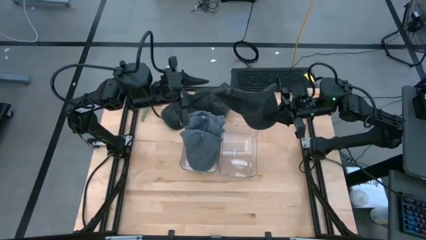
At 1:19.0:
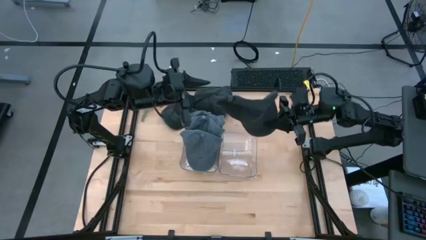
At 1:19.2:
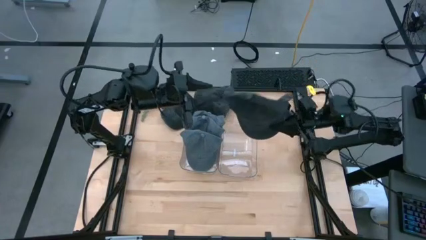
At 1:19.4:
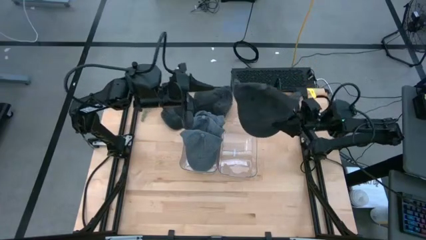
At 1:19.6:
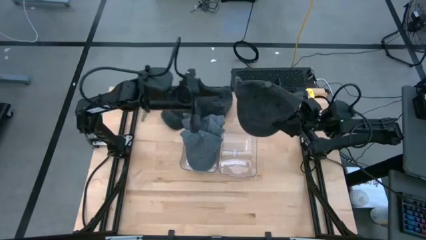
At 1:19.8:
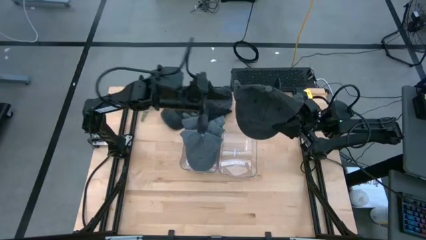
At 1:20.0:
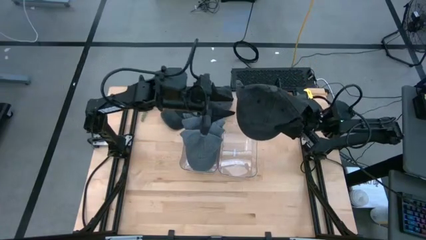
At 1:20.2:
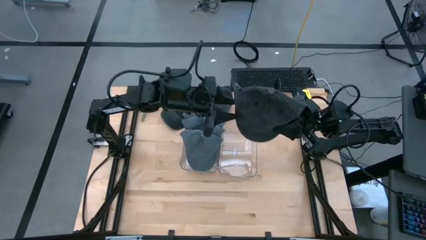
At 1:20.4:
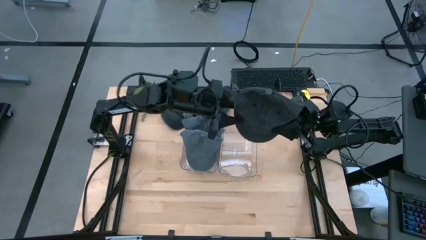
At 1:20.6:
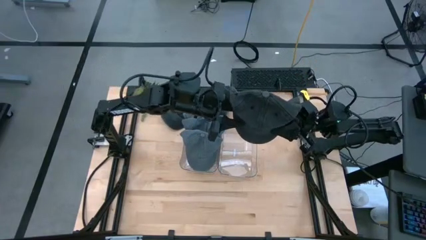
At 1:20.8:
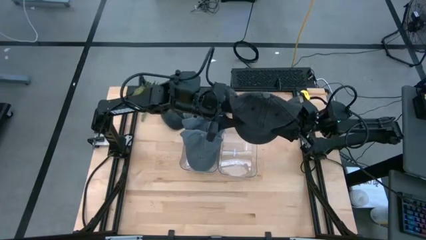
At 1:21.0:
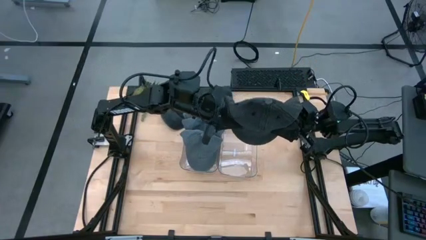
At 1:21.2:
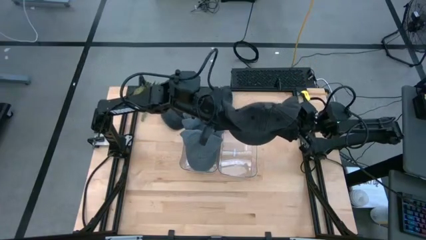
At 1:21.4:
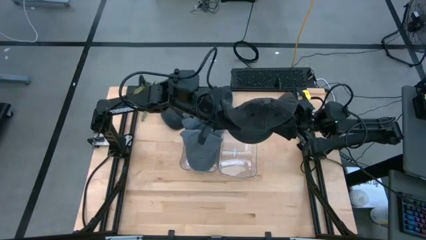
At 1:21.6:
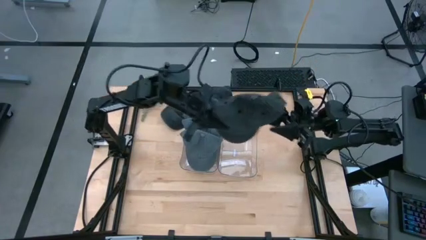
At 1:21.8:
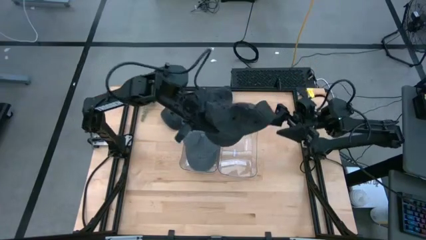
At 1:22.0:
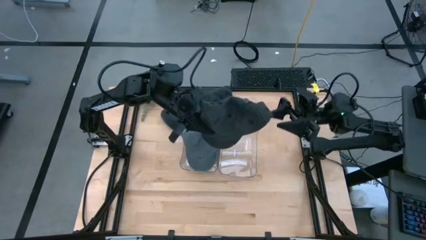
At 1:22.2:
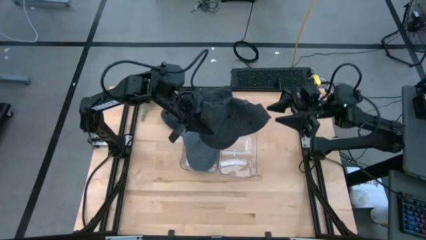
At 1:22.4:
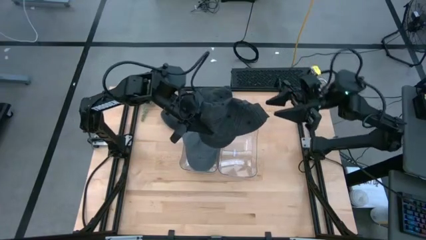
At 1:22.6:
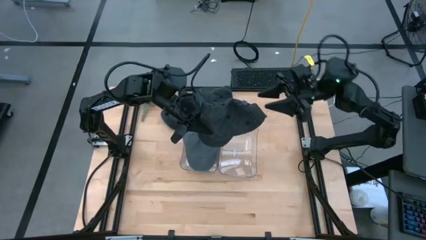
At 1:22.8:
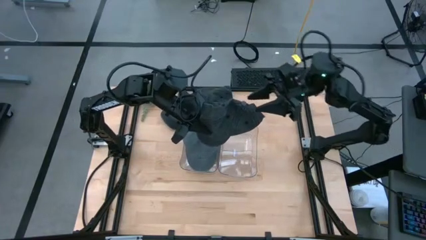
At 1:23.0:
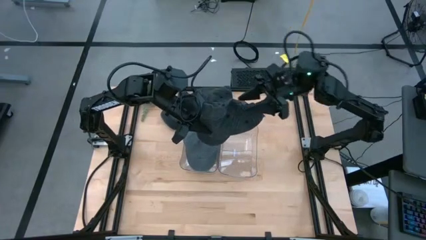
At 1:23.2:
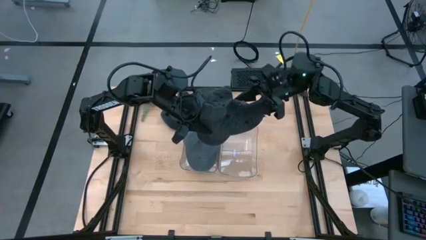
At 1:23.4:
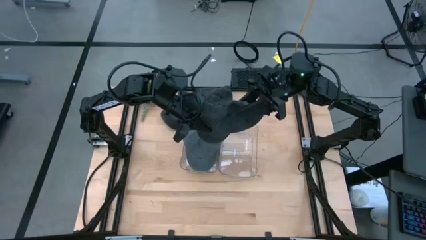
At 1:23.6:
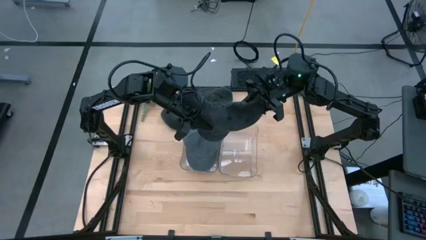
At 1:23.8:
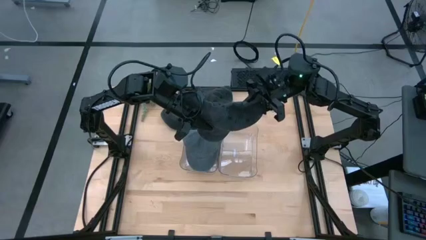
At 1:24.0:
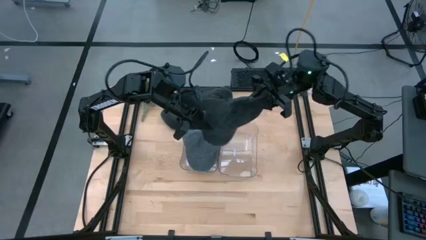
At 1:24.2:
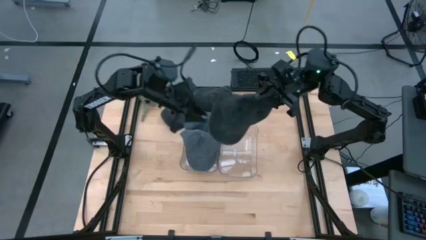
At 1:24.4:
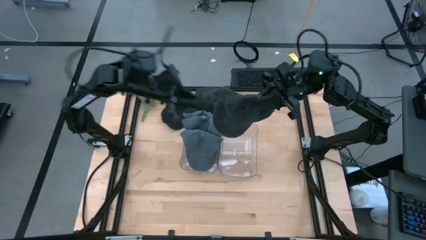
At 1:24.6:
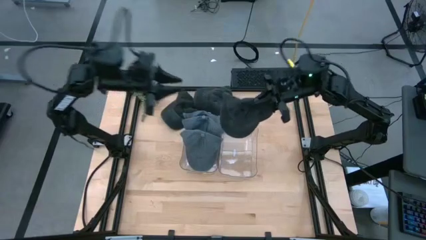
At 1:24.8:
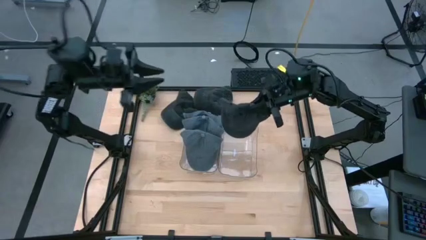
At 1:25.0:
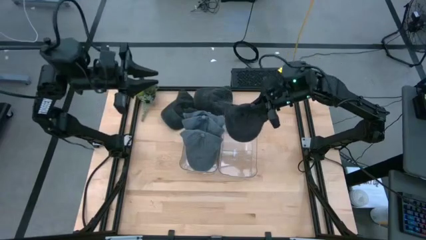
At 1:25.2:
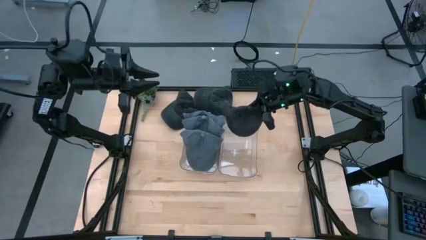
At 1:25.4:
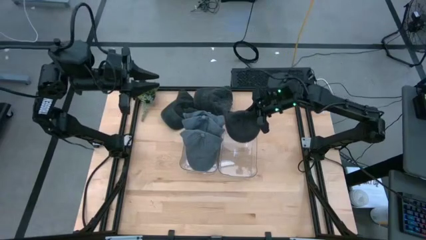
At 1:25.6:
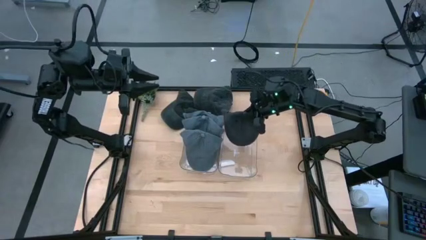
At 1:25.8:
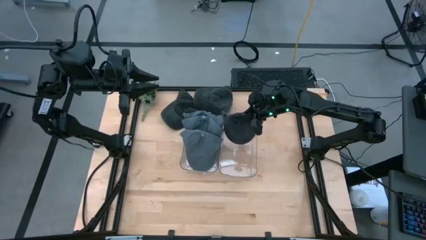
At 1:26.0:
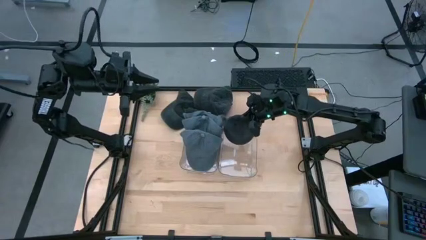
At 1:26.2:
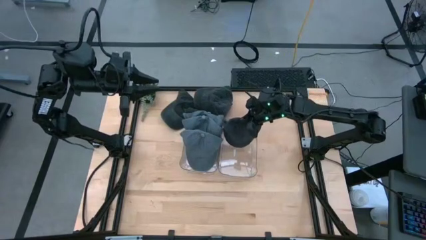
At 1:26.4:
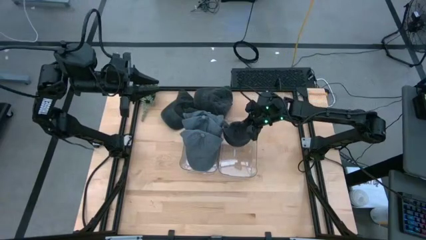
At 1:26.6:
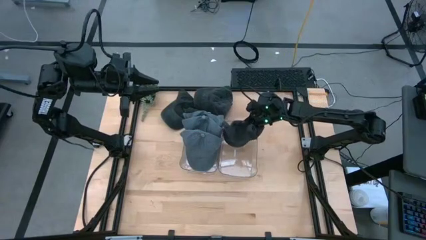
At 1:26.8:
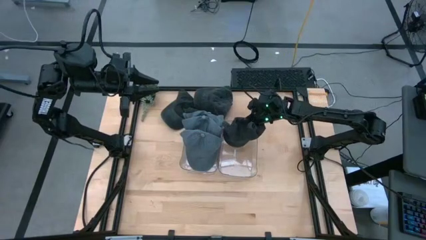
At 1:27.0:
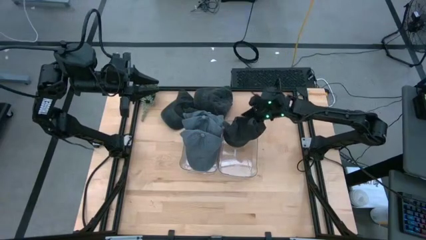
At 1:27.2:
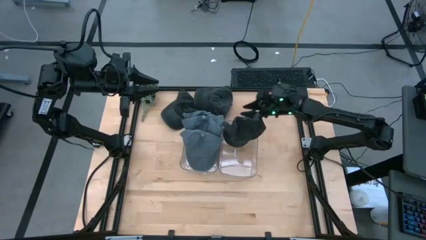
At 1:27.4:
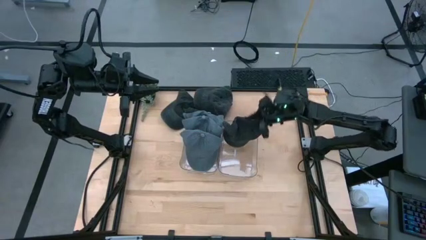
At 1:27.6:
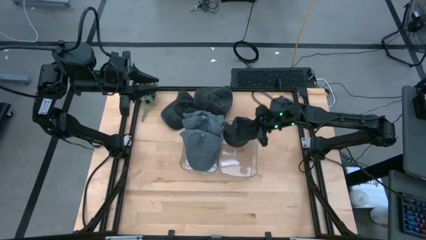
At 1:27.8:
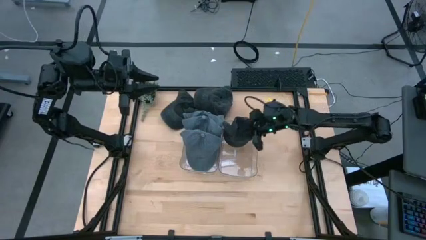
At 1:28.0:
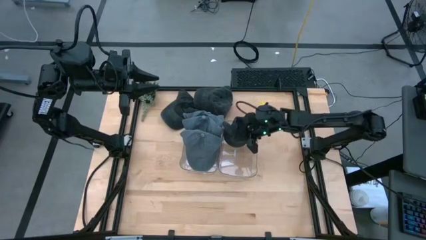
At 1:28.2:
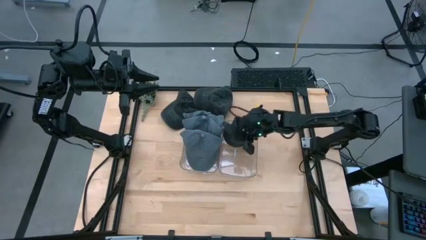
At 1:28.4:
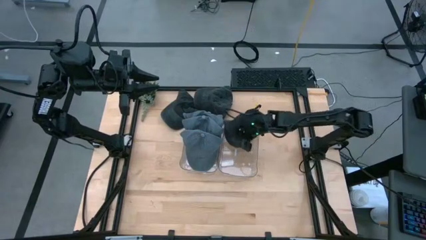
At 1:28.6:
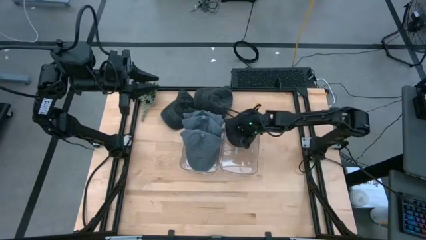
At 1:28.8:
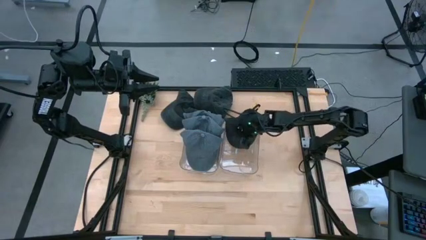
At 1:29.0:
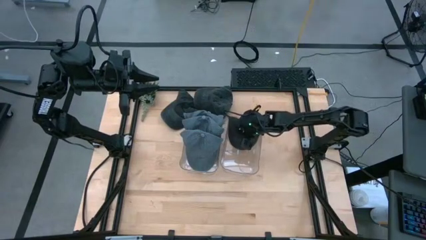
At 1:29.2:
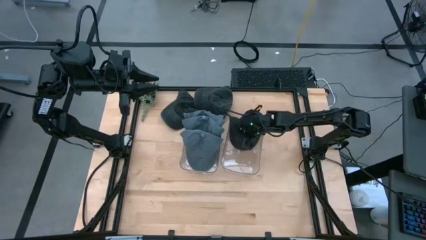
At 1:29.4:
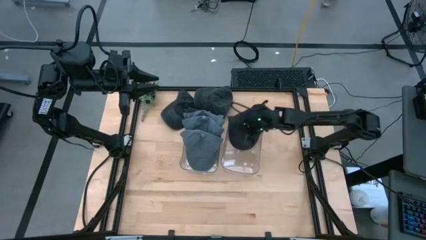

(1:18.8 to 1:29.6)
Task: Pick & Place hat
Put the bottom black cap into the right transparent bin

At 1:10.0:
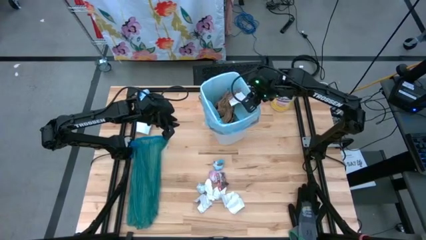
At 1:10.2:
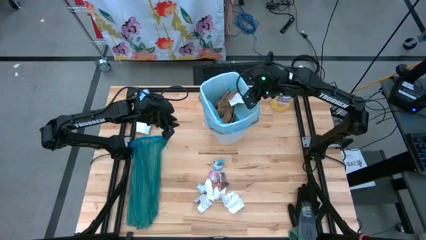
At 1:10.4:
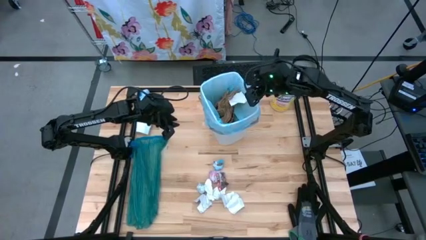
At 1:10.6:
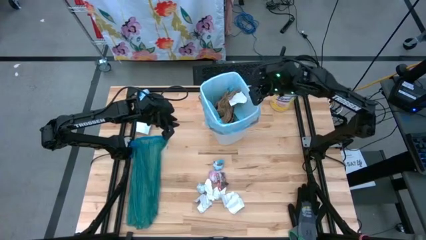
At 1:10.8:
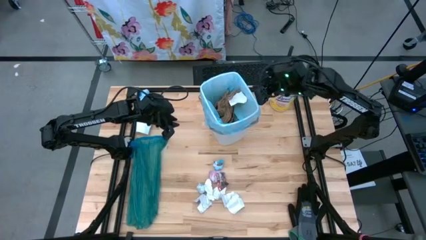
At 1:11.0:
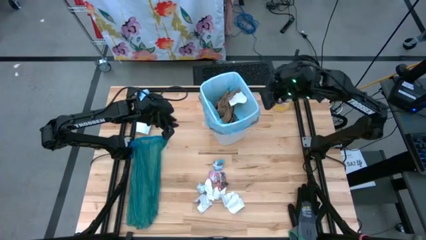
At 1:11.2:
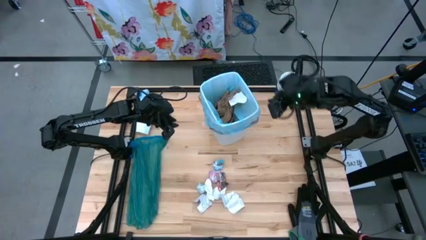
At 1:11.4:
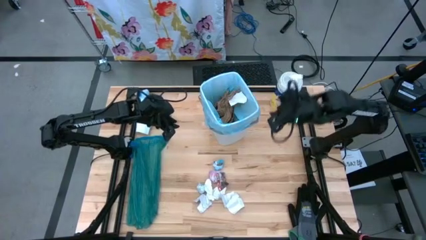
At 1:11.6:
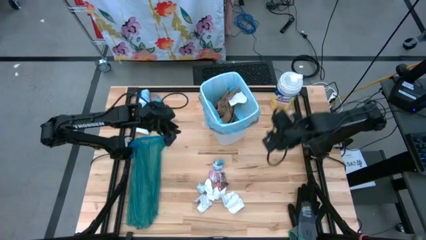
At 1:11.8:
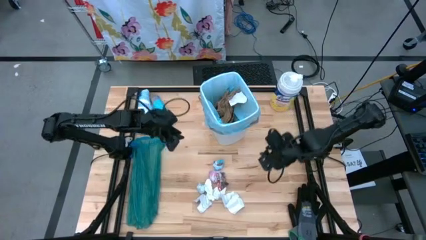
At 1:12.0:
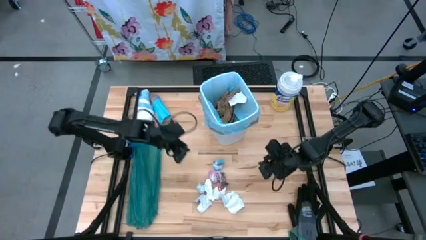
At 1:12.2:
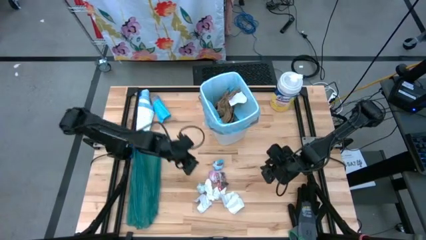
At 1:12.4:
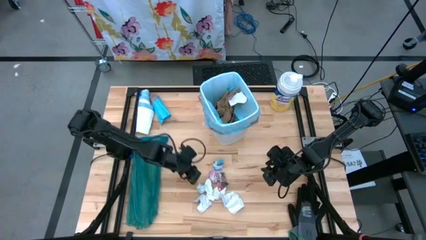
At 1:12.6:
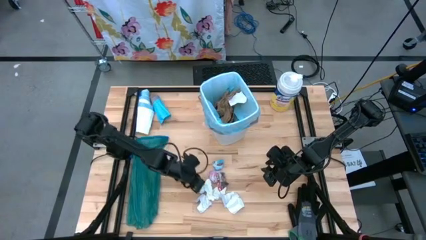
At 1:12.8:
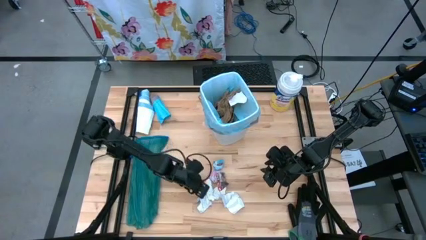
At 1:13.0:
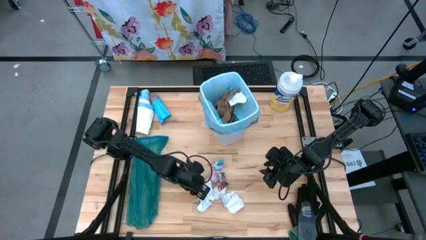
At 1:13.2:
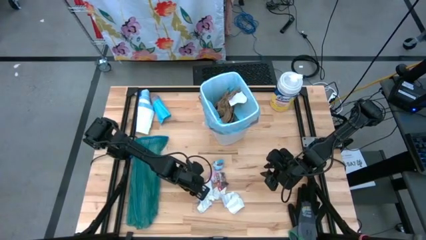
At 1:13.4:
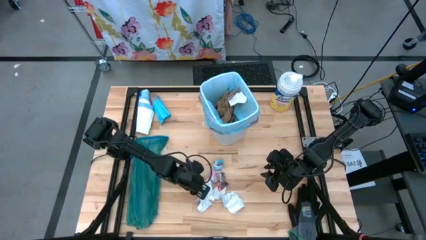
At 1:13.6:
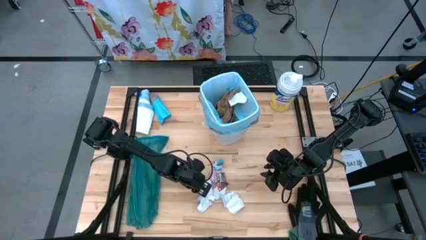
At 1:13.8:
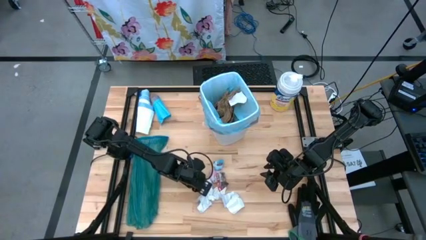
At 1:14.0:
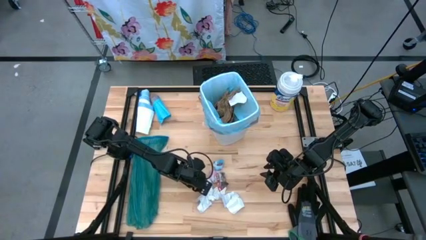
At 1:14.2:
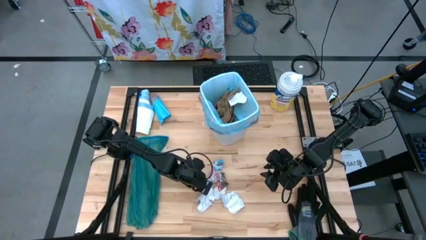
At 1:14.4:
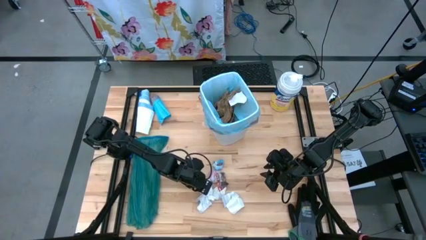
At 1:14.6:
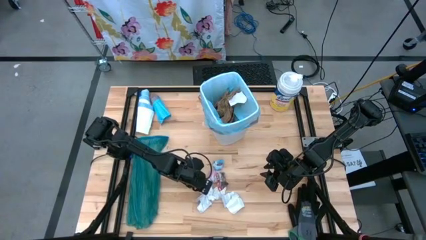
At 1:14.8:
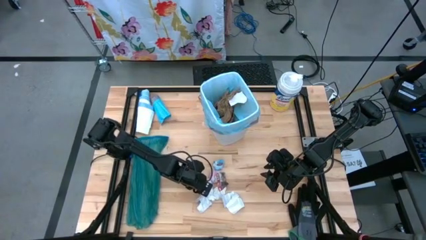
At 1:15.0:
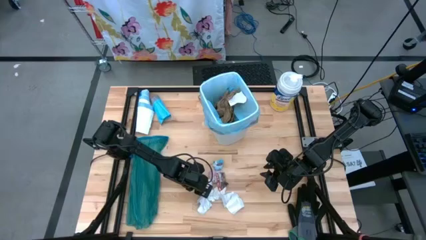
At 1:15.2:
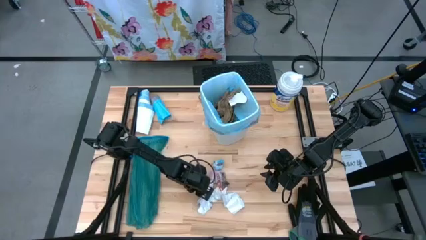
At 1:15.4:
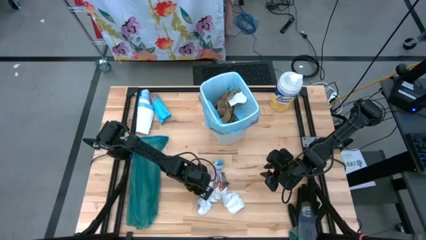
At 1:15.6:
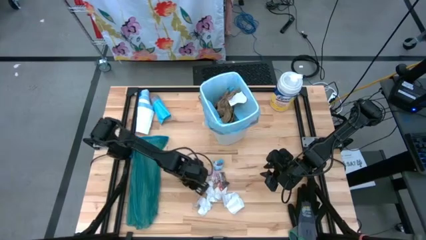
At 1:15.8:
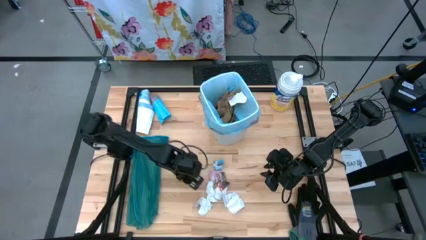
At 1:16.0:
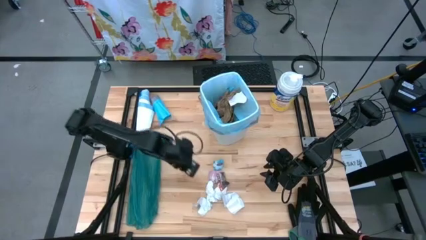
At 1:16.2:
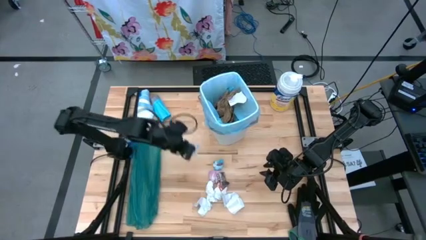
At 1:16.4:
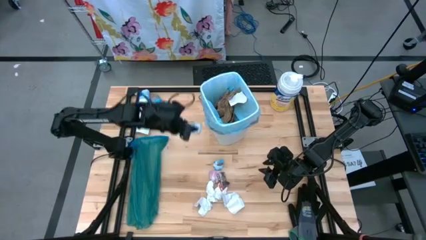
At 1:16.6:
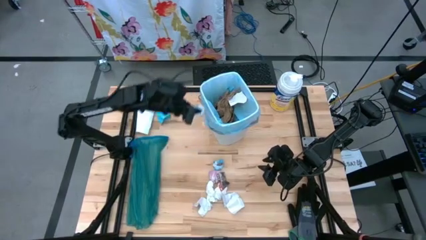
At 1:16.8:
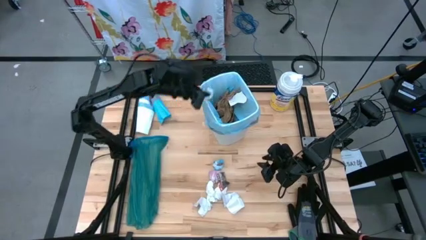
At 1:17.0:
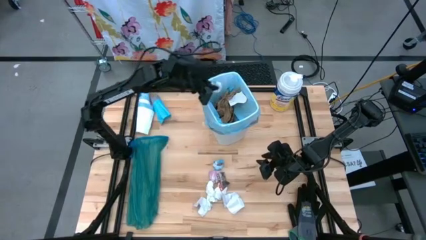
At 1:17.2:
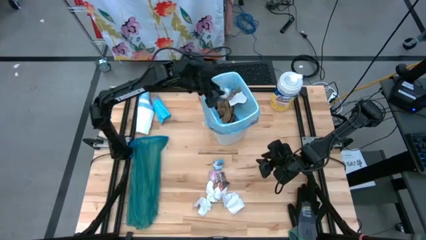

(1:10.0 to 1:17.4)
Task: place trash/remove bag and relplace
Put the blue plastic into the trash bin
